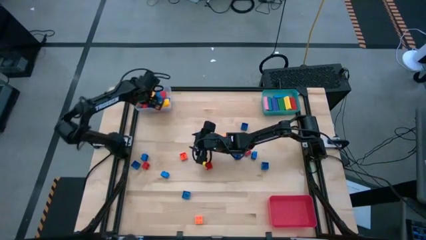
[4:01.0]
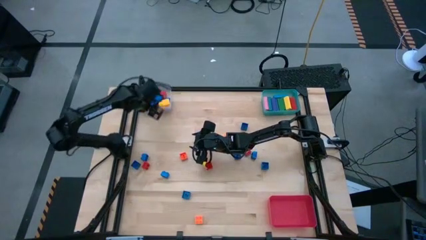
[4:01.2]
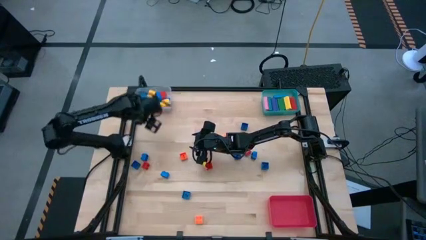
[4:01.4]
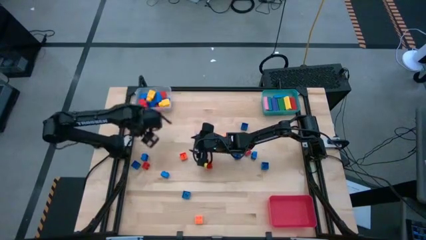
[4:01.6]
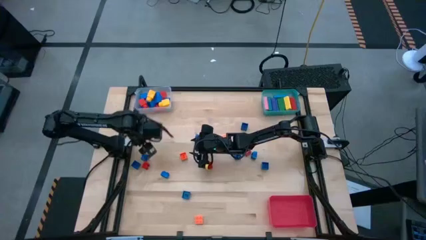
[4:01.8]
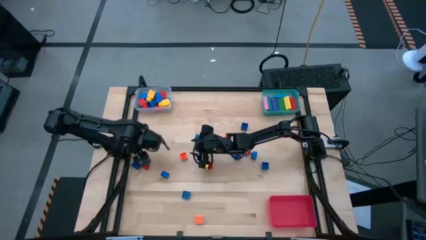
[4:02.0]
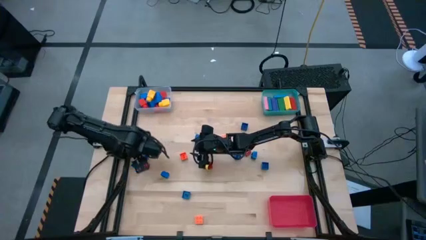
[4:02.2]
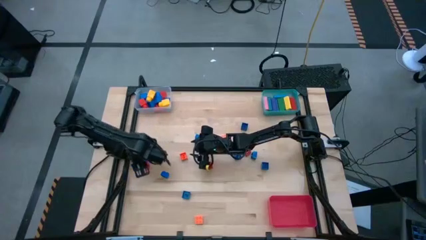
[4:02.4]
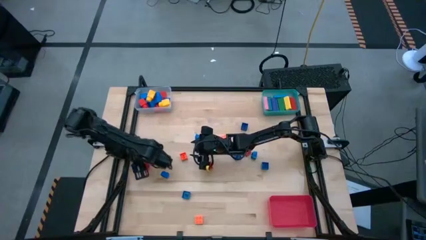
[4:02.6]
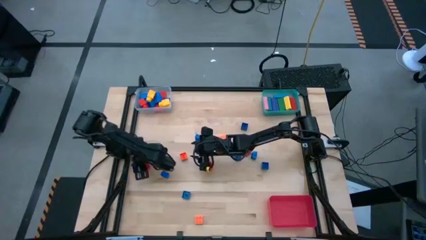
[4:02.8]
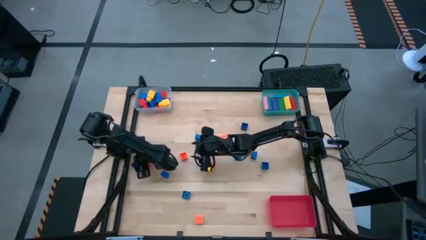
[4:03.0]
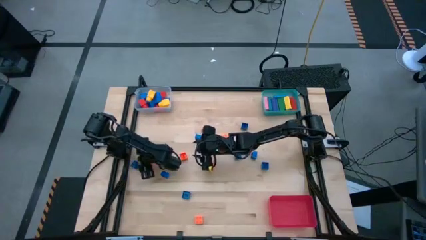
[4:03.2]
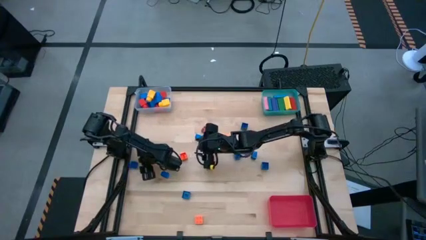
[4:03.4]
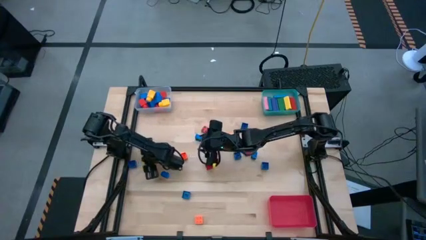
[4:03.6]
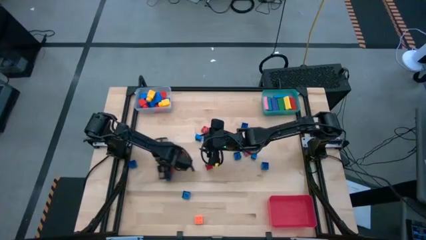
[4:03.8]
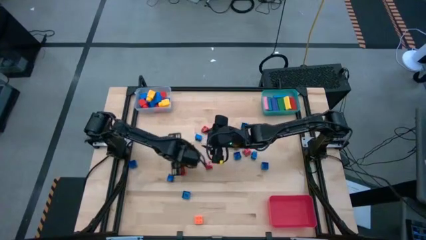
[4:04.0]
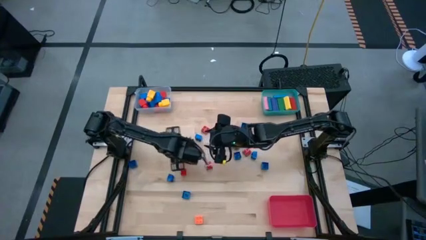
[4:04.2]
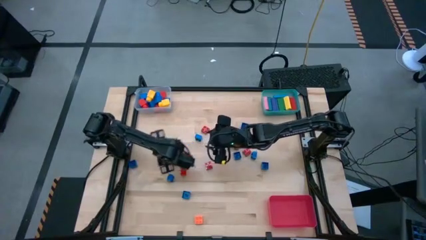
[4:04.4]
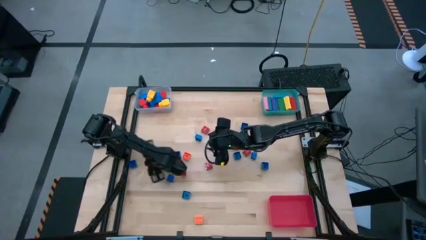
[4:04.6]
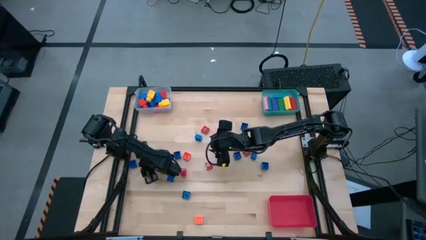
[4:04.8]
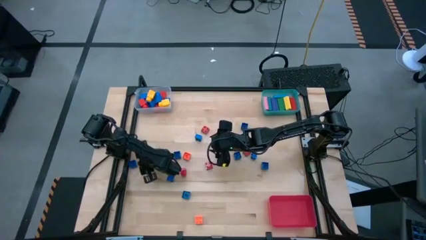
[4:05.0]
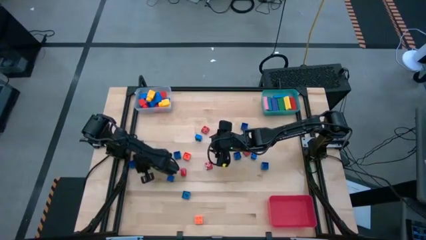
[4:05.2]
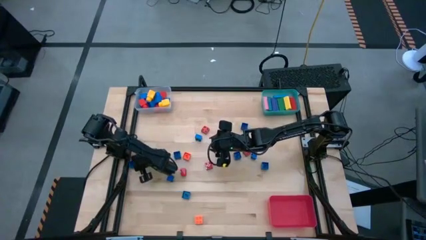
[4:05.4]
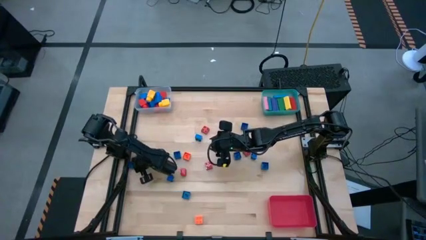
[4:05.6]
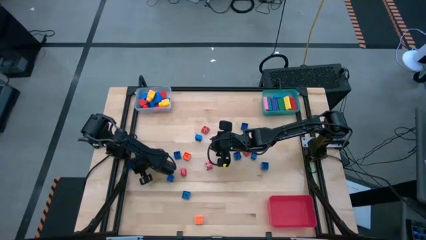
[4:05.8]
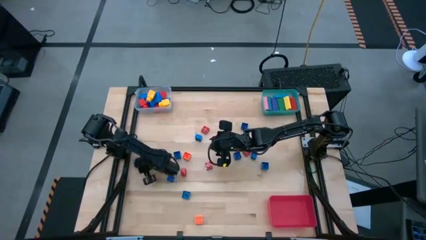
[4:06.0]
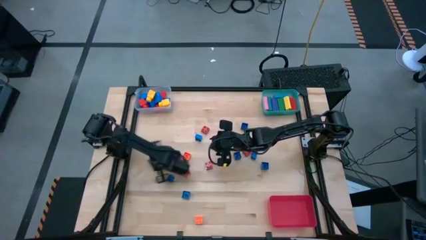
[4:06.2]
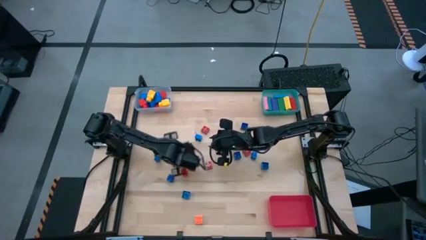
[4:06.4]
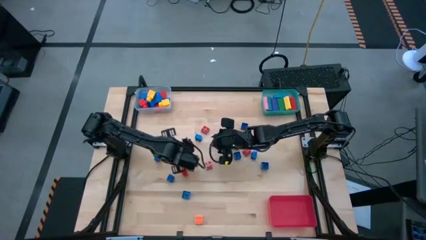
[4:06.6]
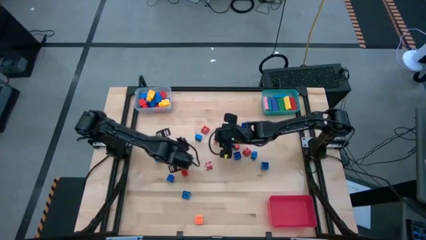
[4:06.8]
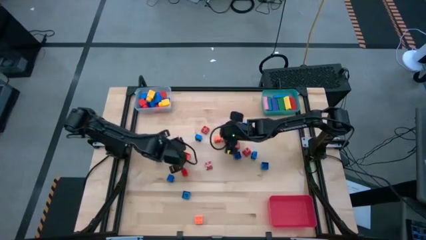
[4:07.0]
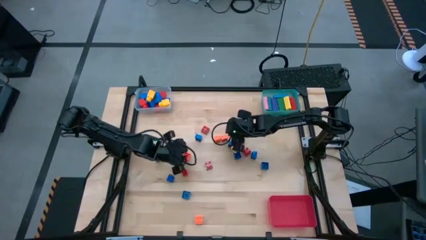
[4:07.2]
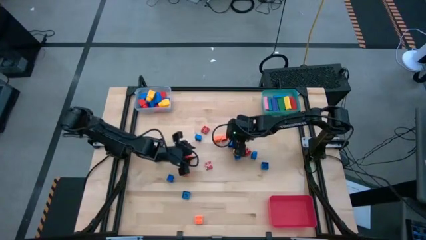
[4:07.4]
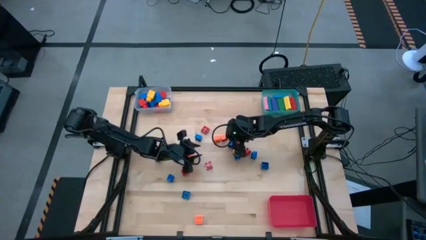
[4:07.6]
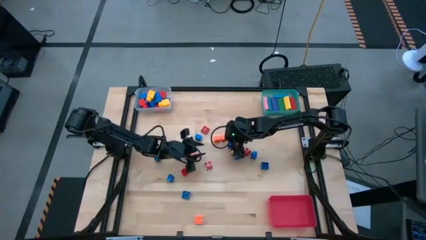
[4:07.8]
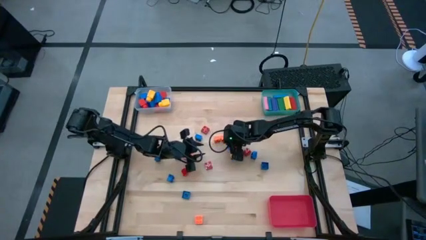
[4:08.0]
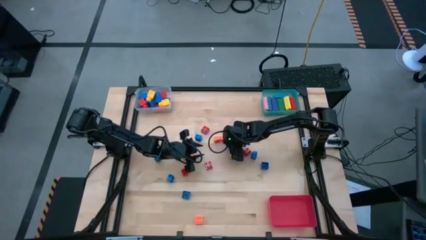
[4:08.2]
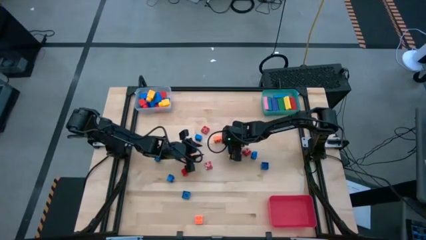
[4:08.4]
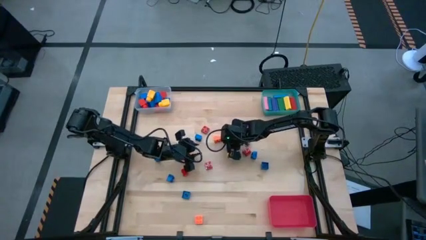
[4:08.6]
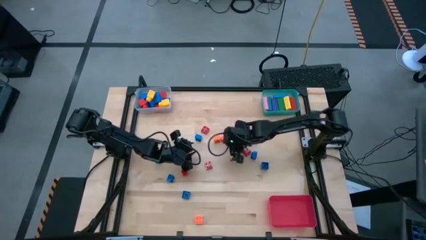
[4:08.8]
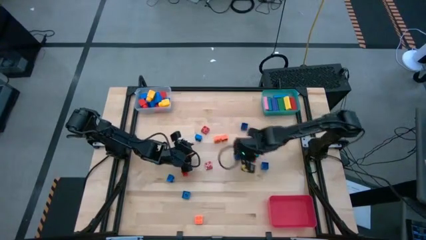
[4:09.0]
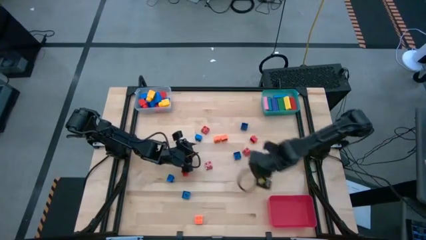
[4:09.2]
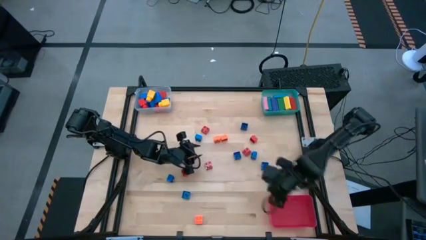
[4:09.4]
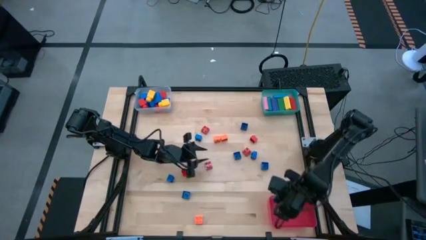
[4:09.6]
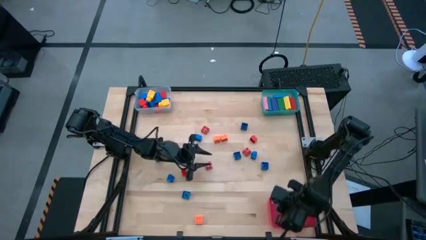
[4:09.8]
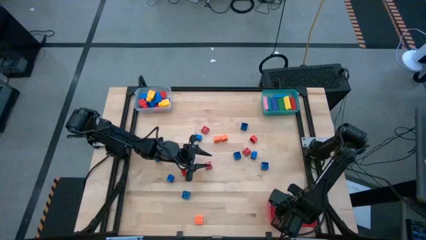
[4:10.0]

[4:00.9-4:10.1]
Task: Sort blocks by size
Put the blue small game piece into the red bin

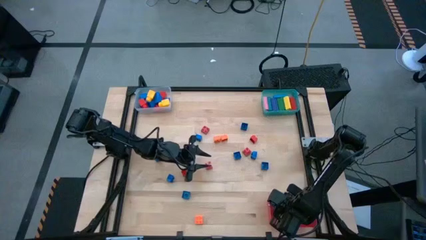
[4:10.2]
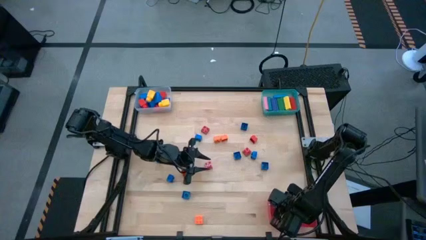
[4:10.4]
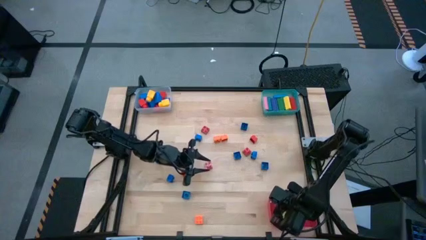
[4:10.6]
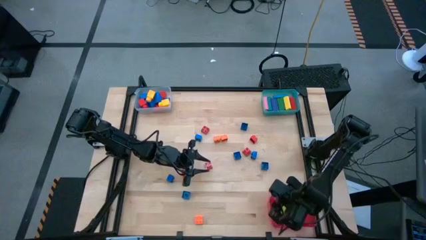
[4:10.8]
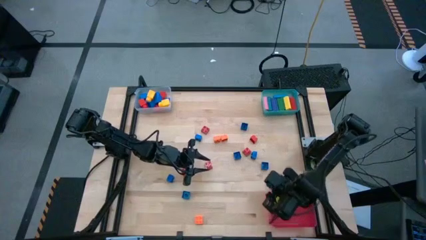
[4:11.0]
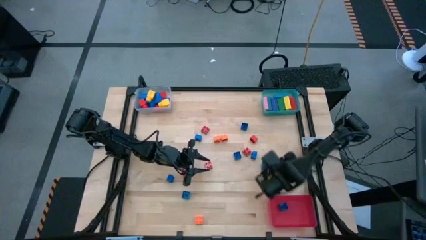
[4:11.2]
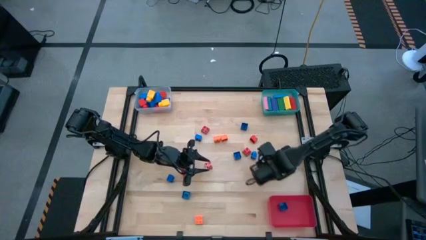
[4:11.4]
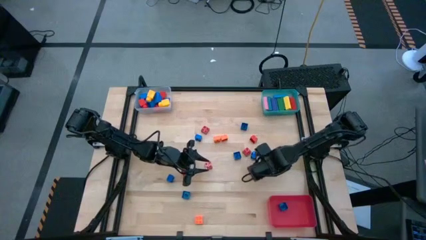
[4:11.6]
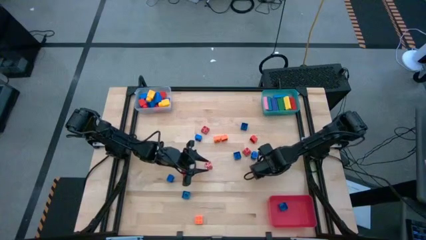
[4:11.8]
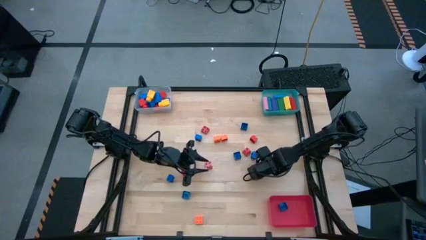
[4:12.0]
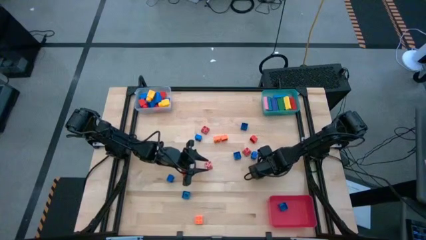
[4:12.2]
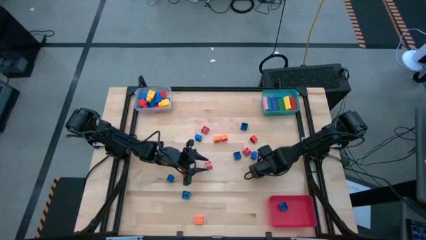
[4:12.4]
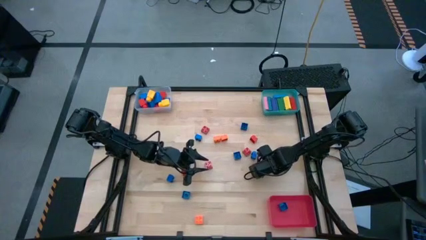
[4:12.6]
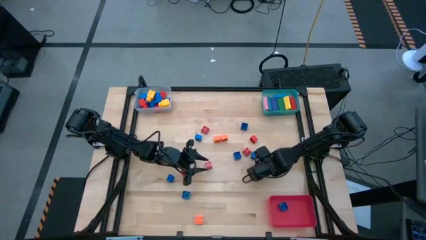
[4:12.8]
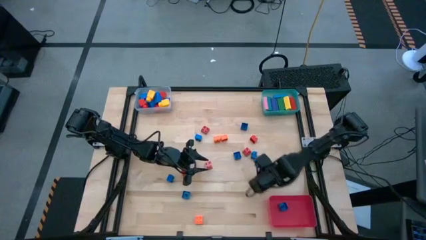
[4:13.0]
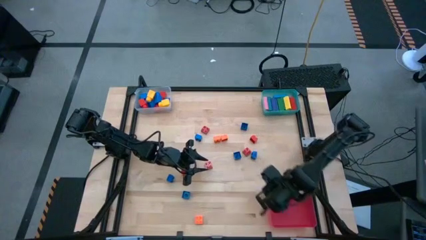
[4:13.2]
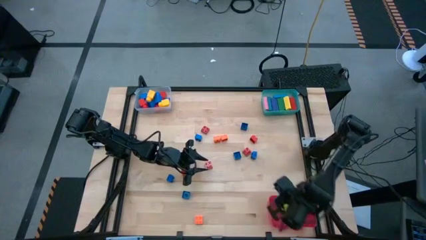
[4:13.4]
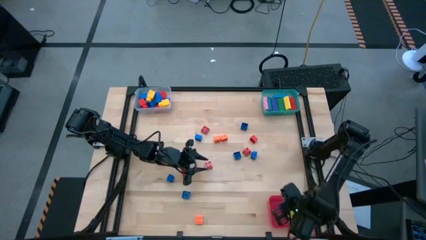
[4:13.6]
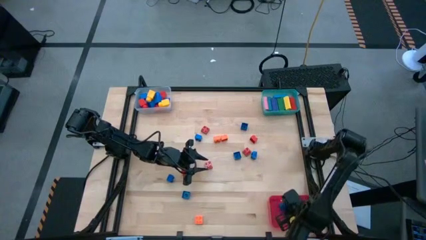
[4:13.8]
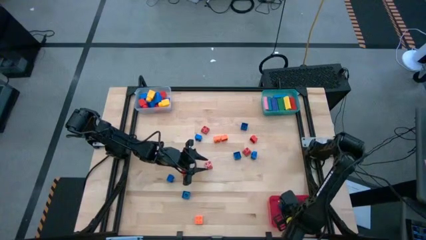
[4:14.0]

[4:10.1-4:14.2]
Put the small blue game piece into the red bin

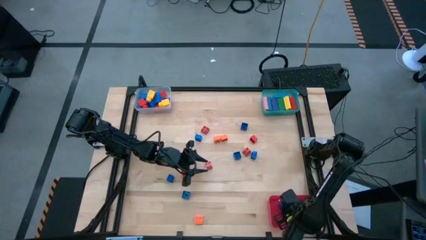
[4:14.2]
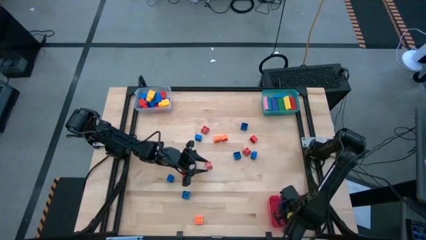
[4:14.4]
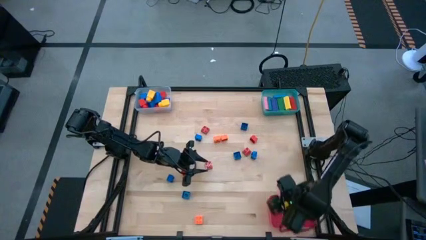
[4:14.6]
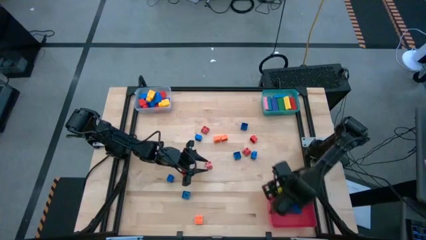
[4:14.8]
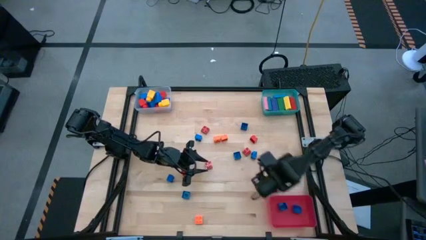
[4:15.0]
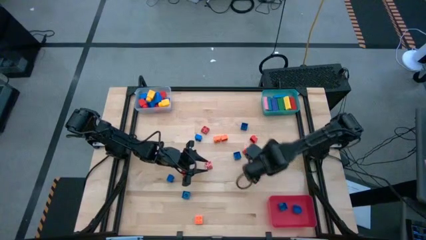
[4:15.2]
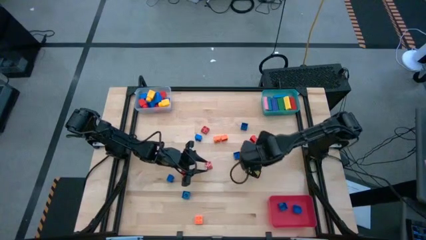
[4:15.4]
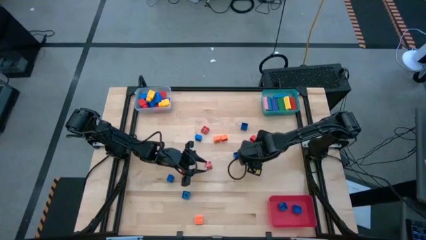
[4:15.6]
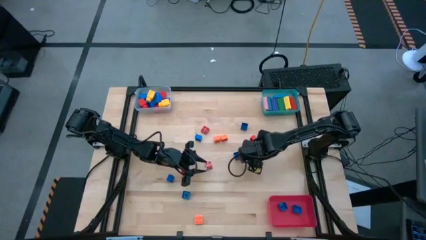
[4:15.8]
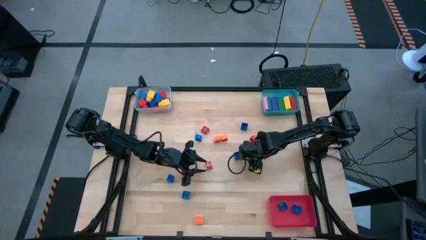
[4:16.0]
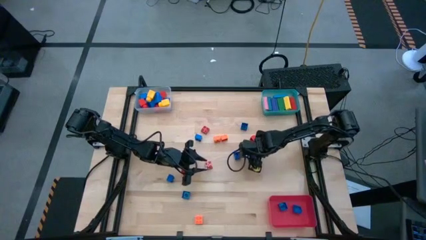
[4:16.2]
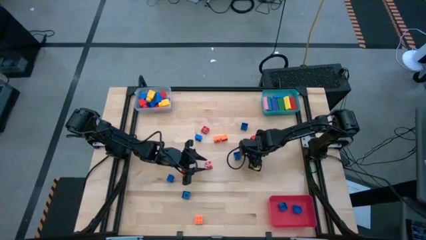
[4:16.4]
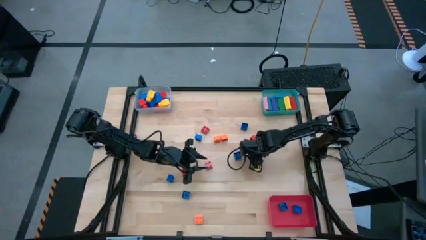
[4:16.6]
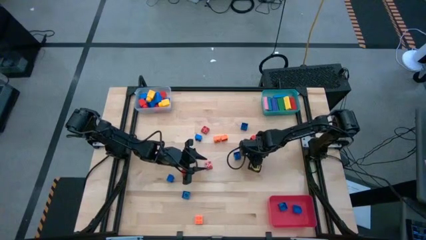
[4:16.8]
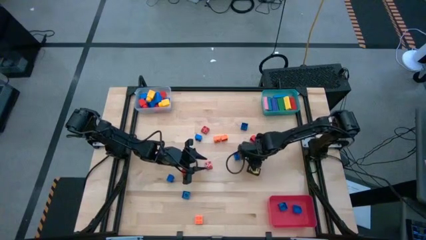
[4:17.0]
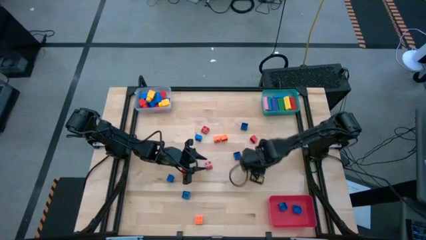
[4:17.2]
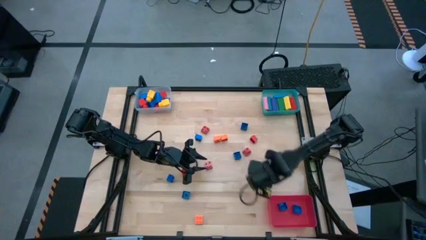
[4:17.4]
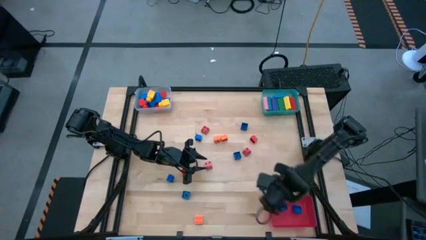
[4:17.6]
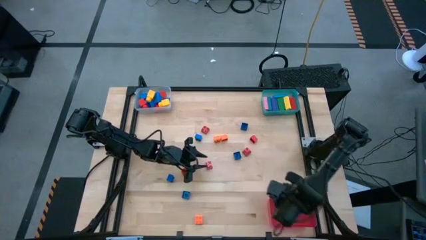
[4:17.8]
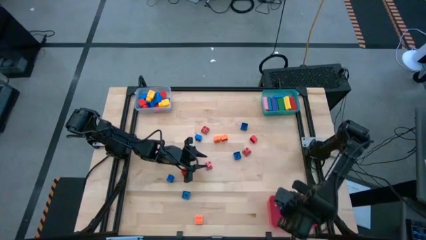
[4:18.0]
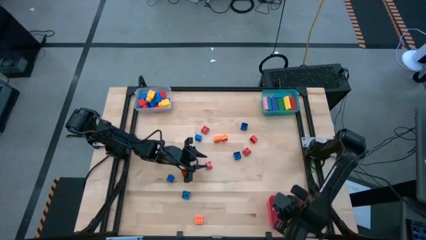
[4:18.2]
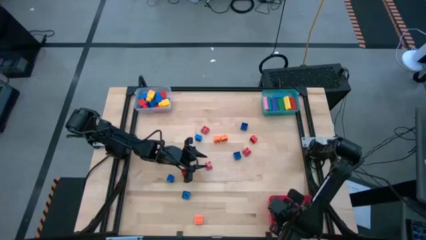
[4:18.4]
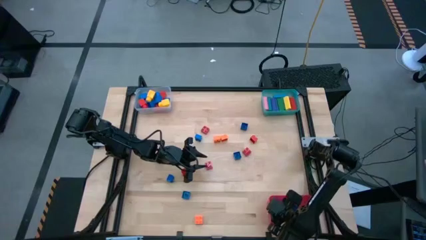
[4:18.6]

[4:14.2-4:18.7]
Put the small blue game piece into the red bin
